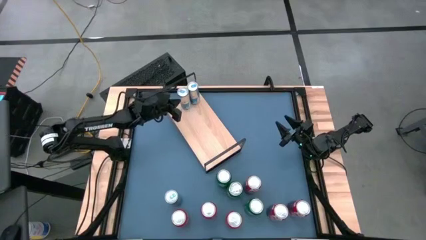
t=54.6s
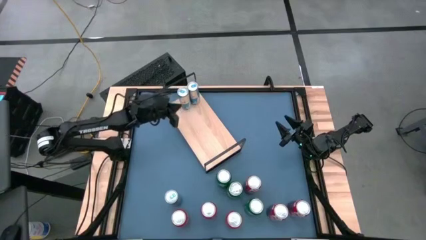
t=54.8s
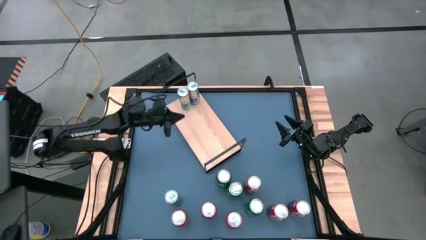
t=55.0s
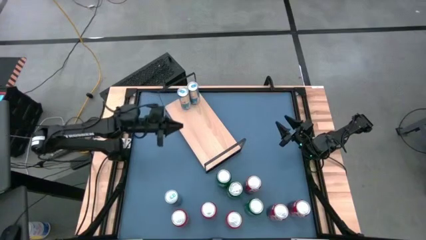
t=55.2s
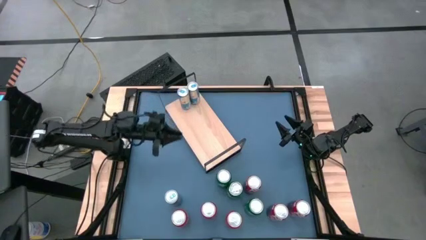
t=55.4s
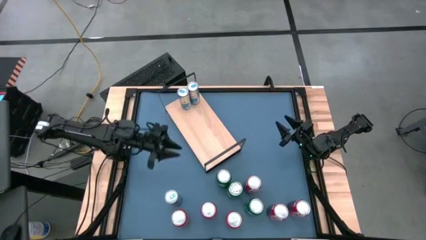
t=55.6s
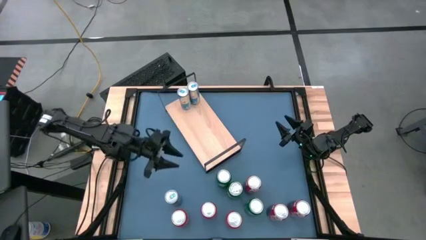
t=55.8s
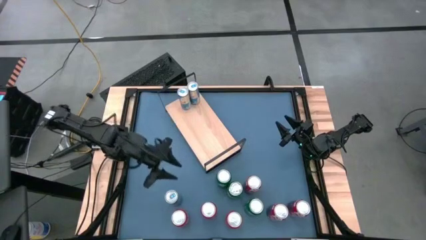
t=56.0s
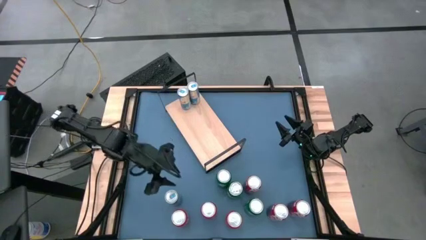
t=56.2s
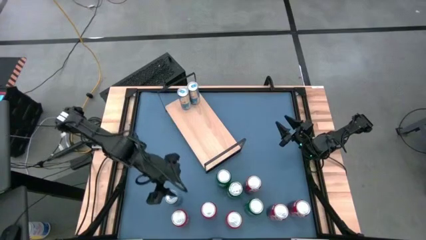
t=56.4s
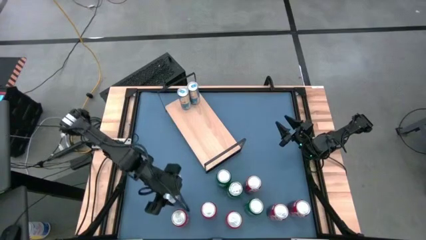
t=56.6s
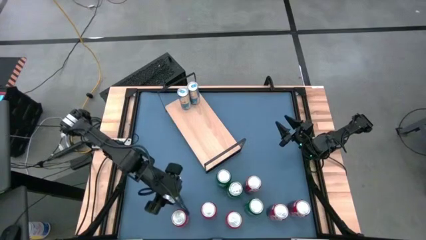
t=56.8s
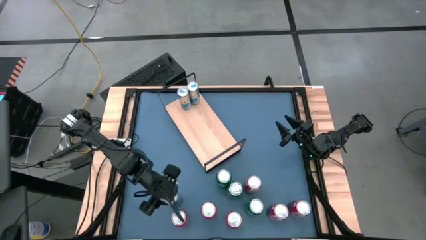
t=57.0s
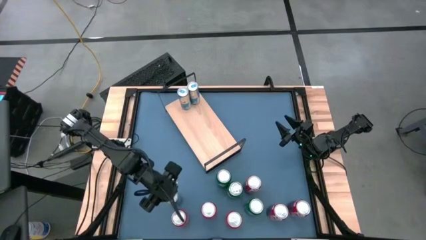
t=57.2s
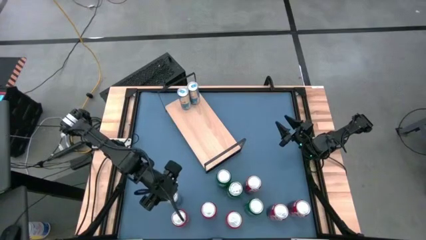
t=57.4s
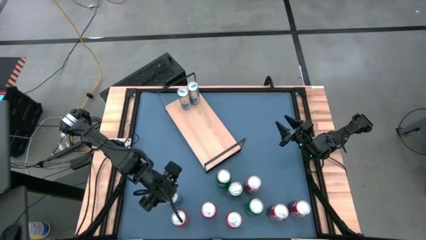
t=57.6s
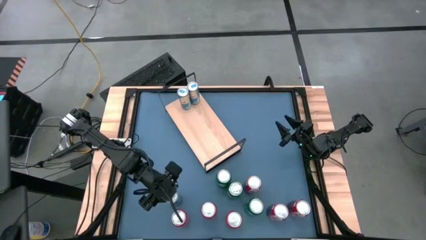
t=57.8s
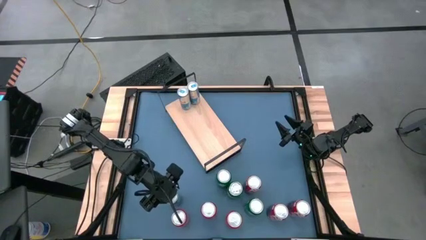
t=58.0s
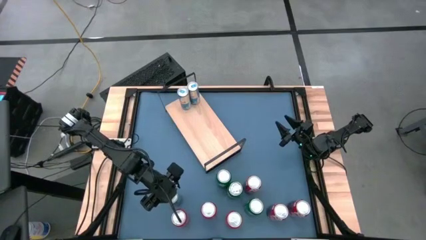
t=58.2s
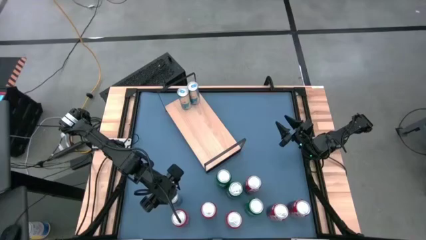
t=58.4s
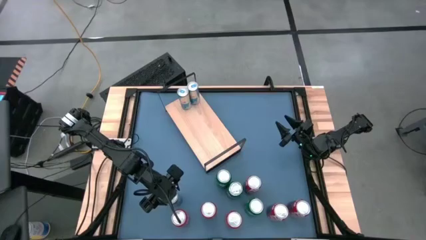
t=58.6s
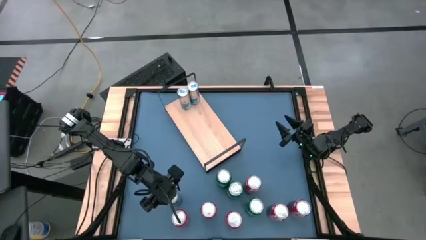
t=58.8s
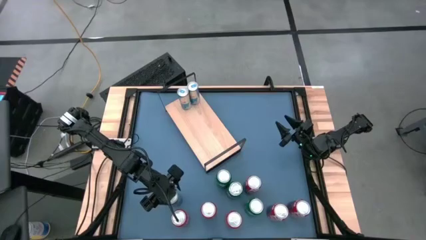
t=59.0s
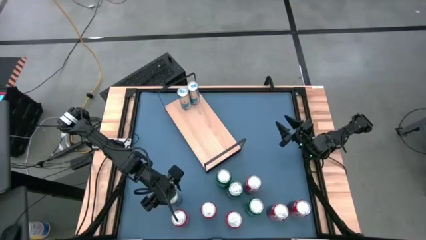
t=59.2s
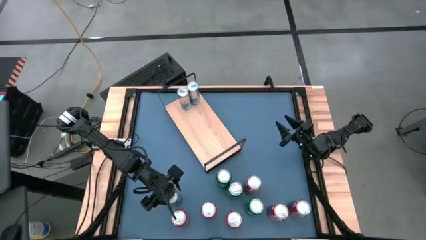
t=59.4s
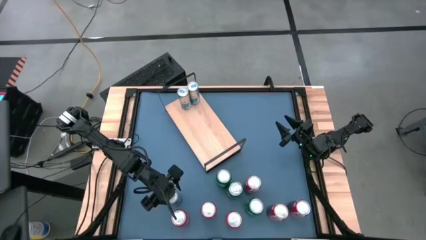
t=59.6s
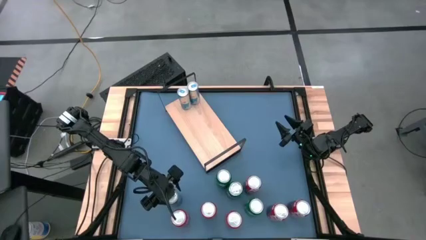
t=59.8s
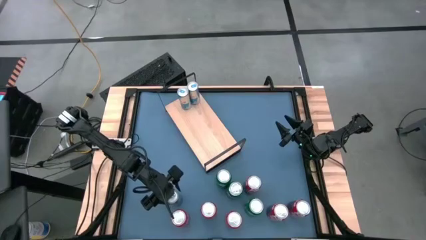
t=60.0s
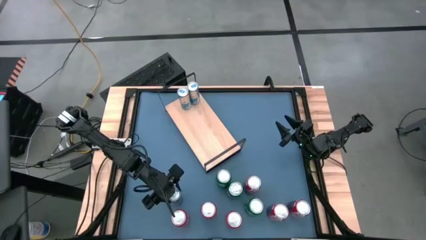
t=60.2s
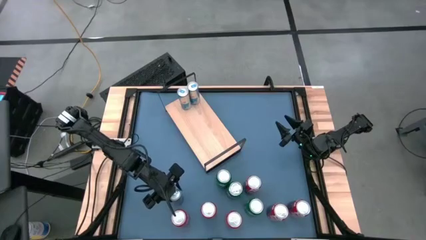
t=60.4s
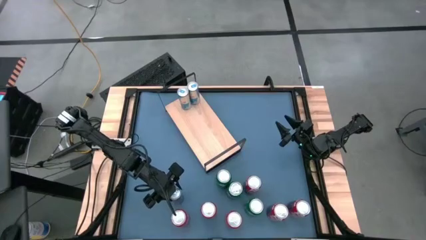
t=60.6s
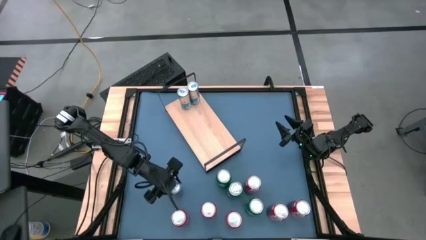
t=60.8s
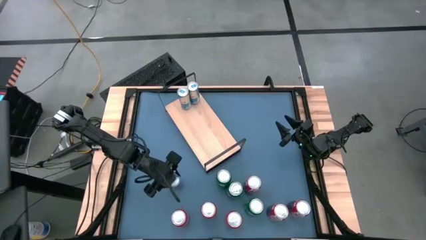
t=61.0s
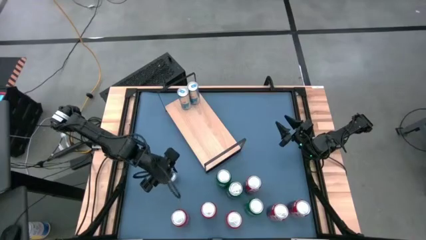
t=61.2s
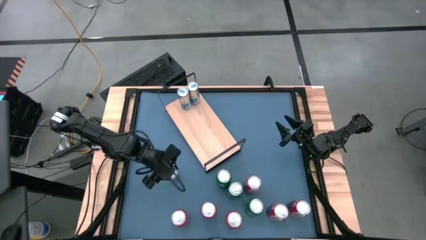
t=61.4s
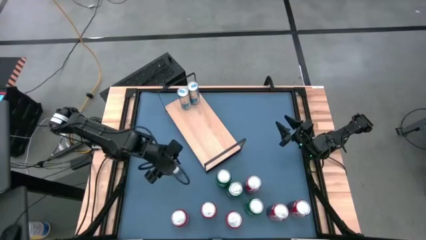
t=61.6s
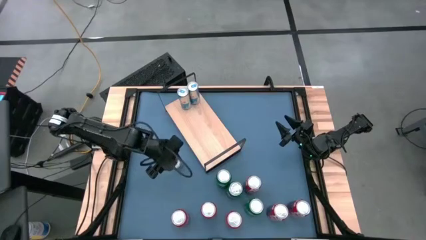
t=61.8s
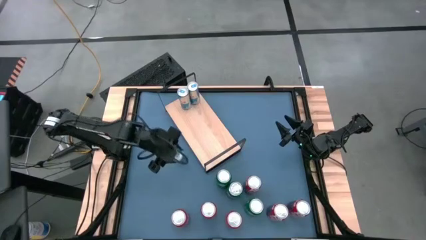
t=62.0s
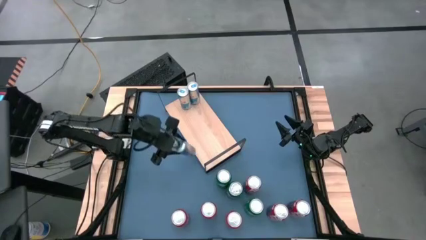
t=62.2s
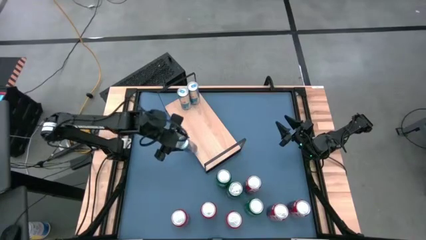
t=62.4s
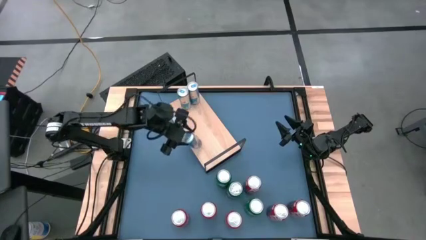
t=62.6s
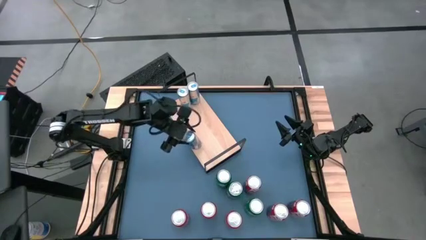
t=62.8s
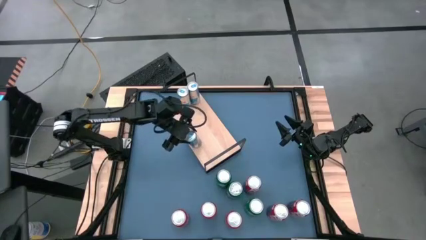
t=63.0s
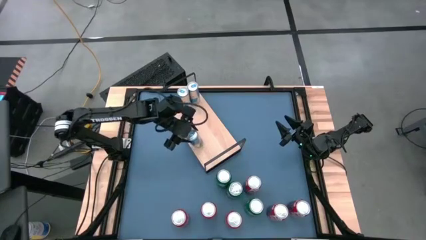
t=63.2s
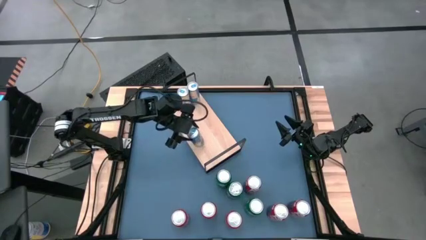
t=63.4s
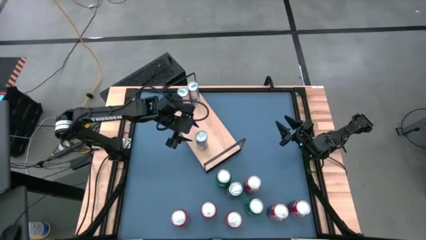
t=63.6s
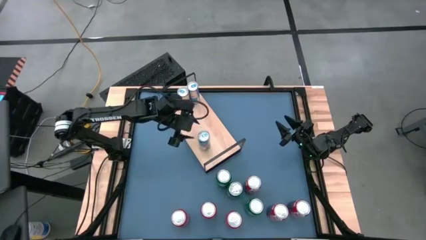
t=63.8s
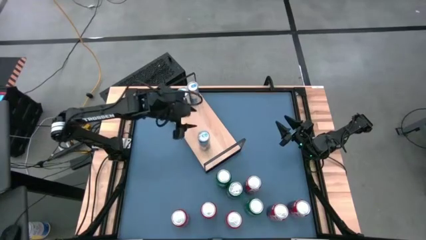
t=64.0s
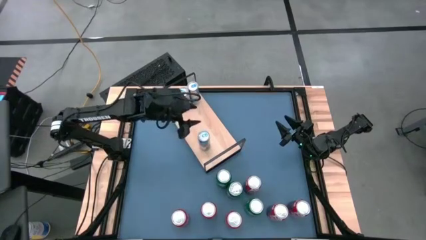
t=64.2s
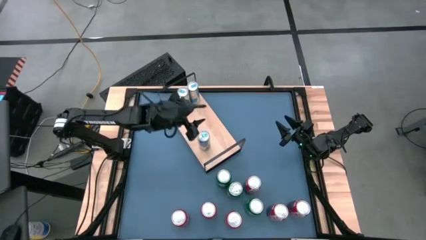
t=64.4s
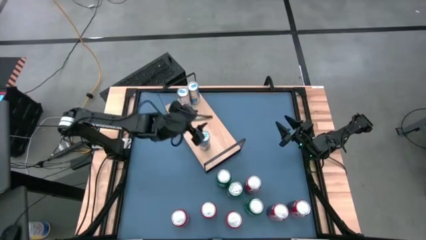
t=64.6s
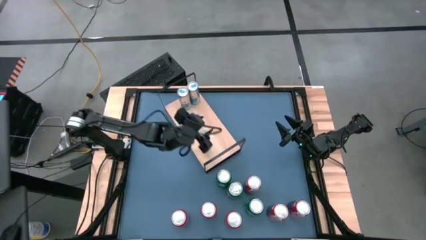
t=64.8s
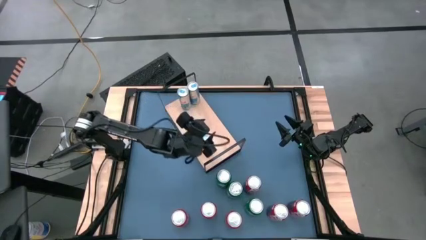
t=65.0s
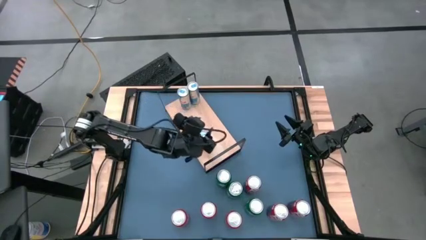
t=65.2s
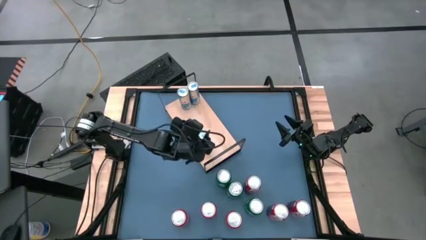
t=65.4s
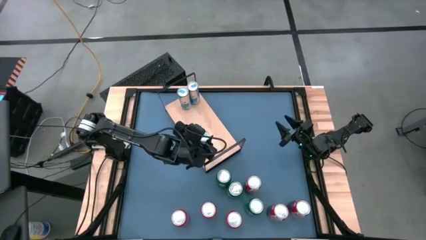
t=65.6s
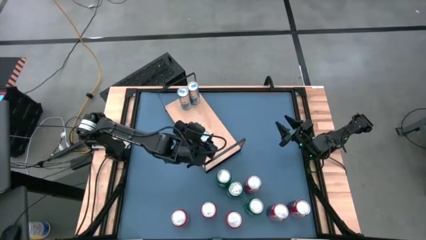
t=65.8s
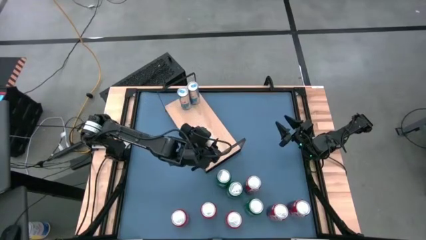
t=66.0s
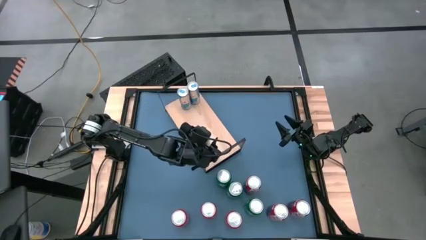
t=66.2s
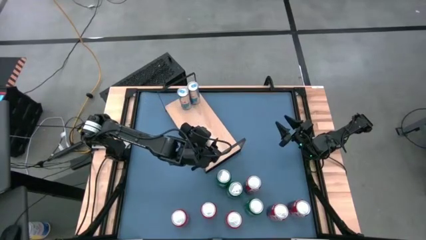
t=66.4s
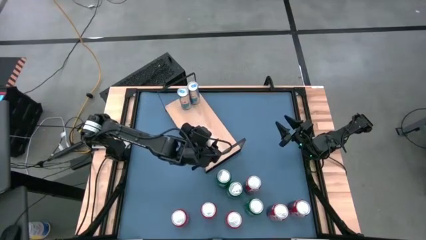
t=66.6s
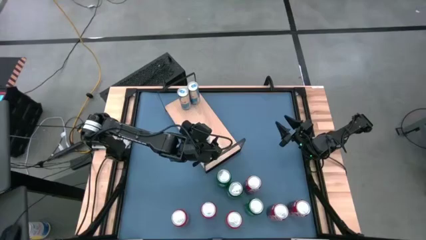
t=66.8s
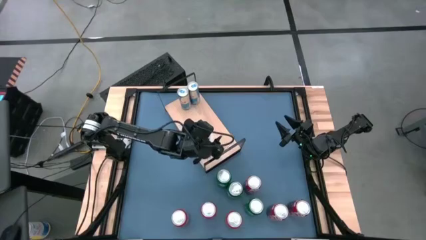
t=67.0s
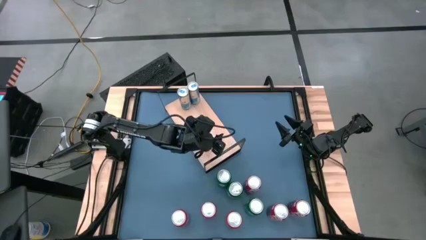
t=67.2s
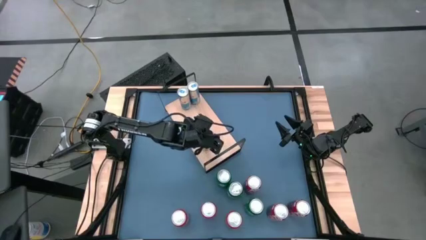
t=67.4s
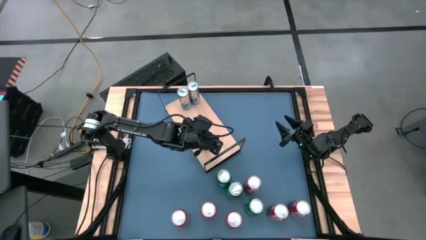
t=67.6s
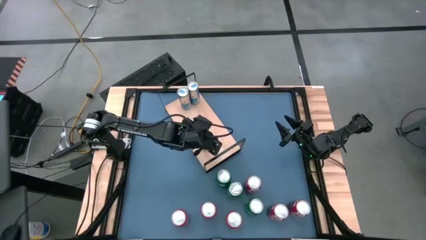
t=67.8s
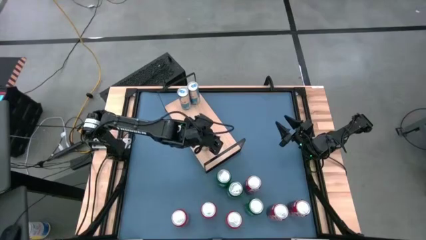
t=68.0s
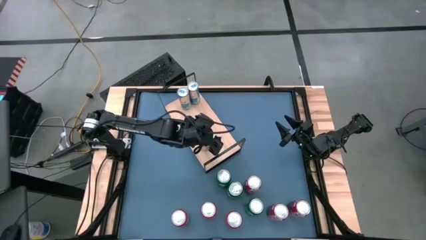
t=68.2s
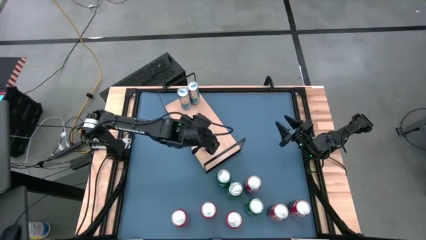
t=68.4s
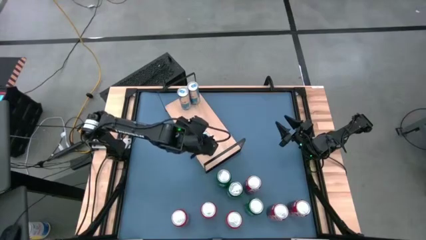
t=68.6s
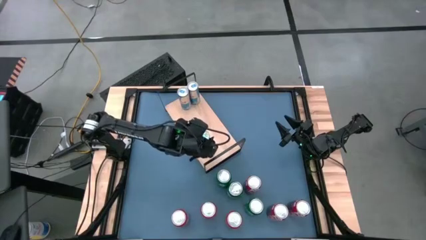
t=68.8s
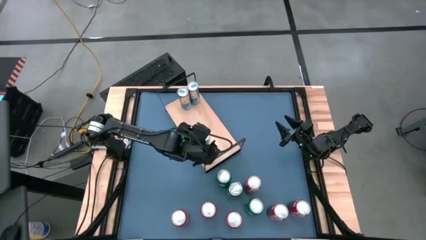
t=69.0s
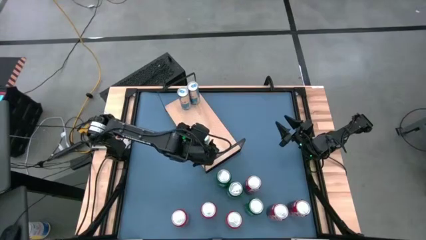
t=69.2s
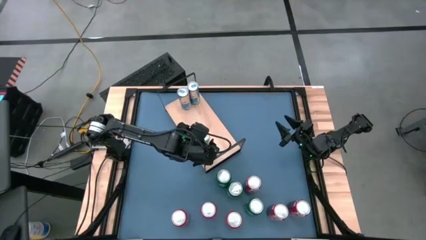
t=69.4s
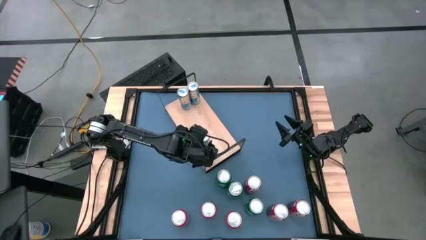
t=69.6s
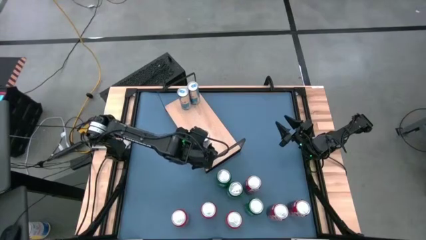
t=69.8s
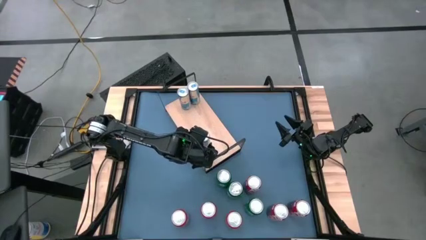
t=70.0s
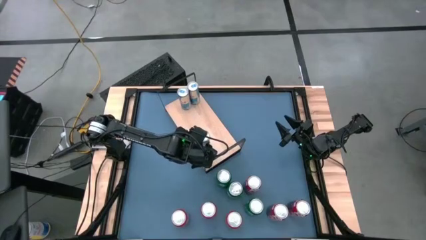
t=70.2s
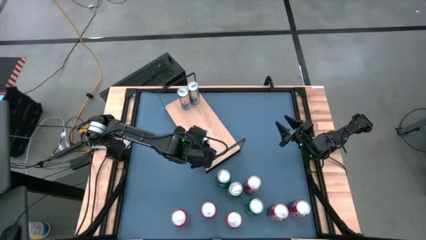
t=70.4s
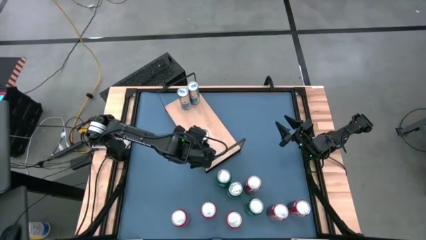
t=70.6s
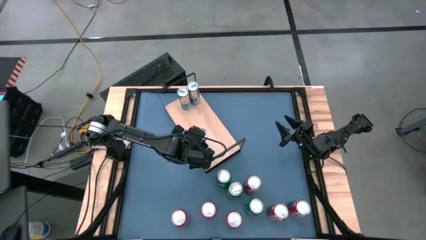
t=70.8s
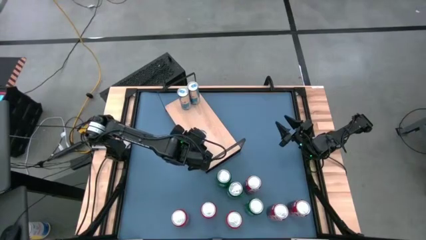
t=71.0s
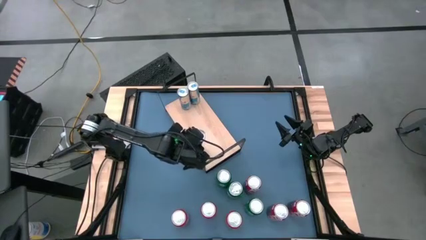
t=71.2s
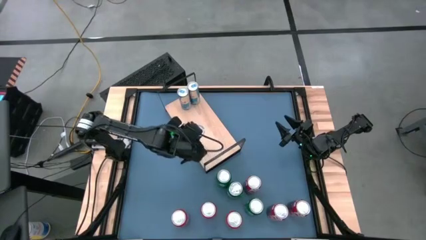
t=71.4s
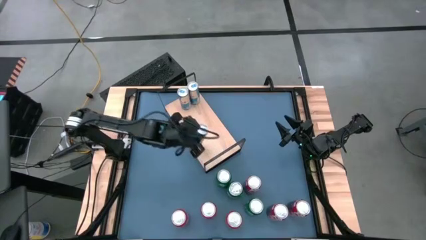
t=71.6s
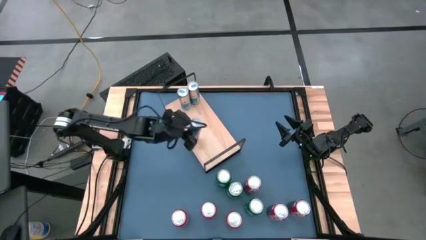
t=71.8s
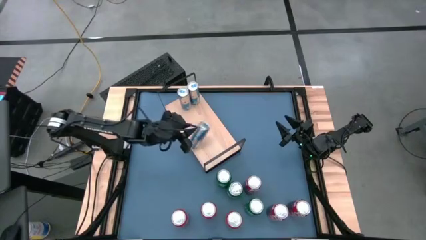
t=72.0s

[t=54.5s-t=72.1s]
Task: Place canned beverage on shelf
Put the blue soda can on the shelf aligned with the other blue soda cans
